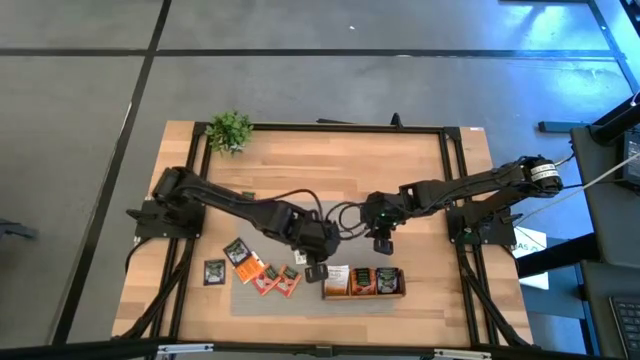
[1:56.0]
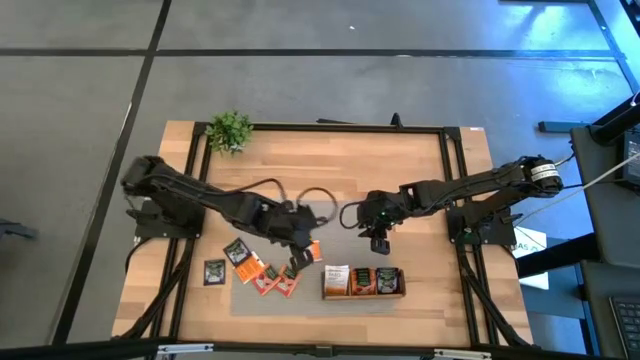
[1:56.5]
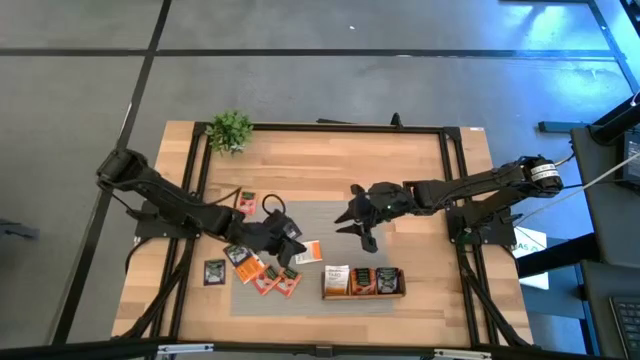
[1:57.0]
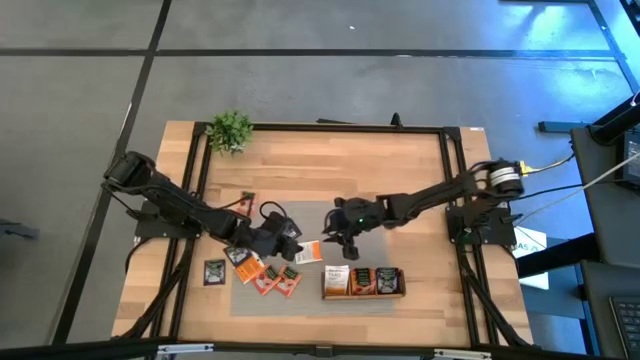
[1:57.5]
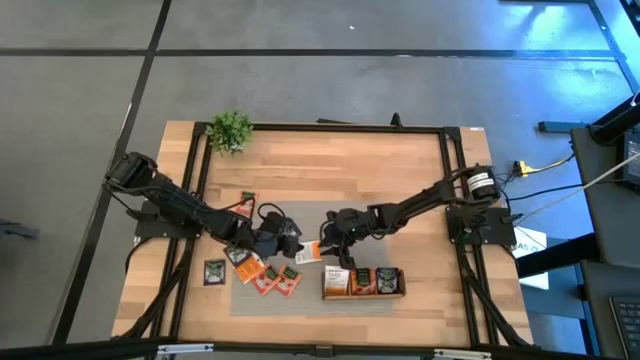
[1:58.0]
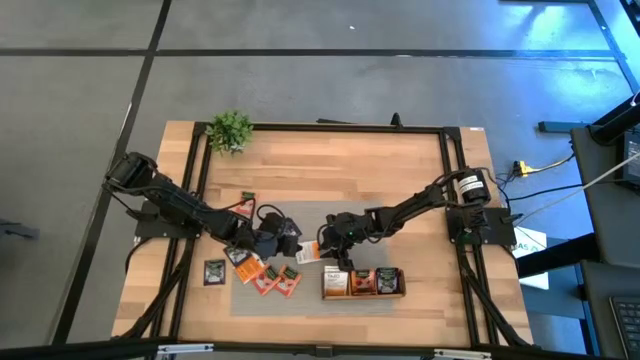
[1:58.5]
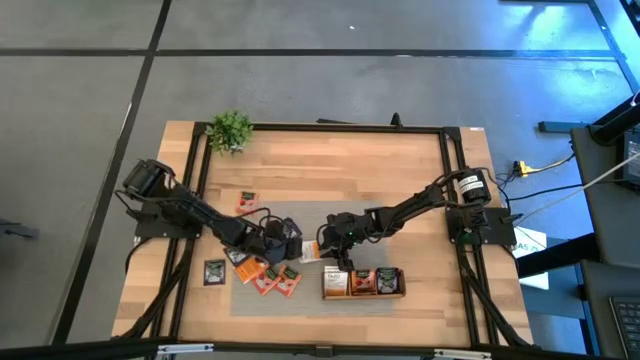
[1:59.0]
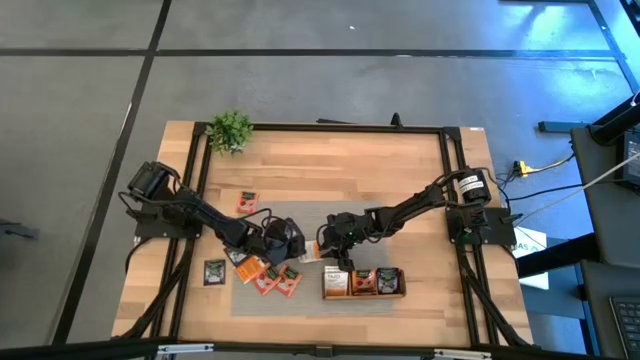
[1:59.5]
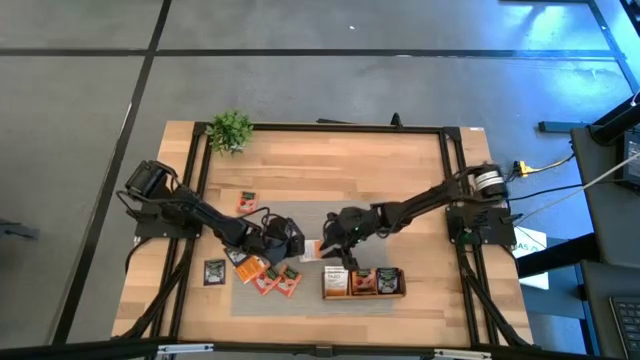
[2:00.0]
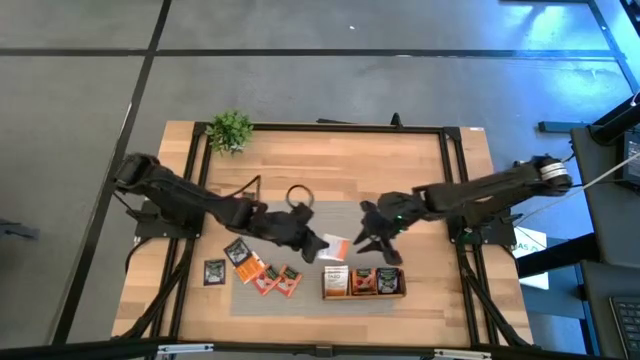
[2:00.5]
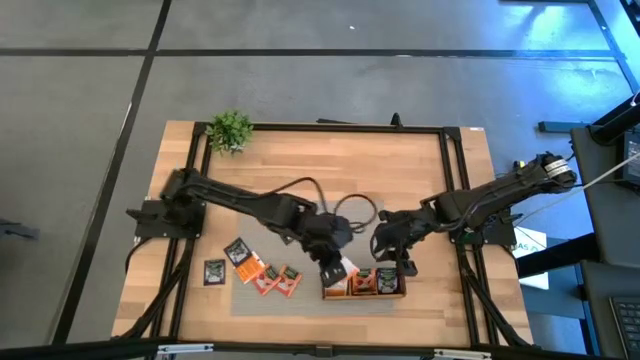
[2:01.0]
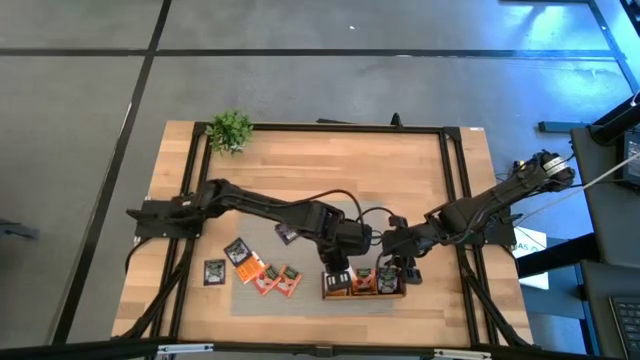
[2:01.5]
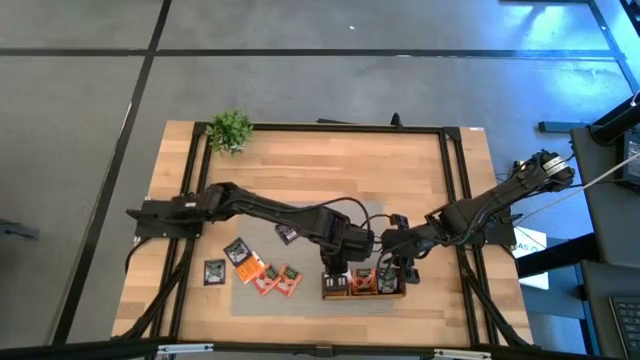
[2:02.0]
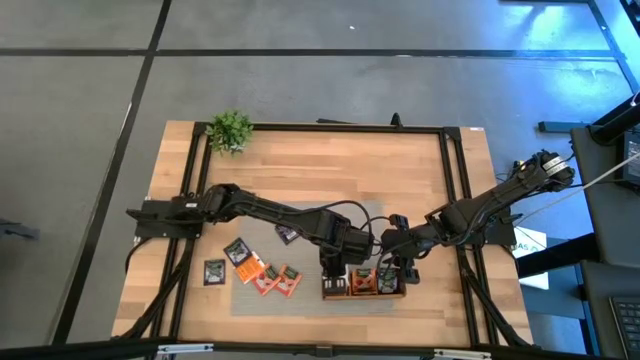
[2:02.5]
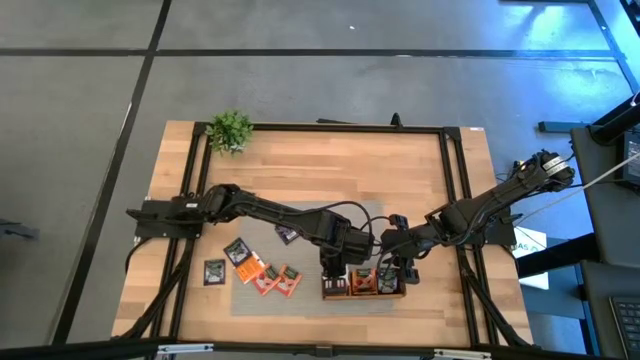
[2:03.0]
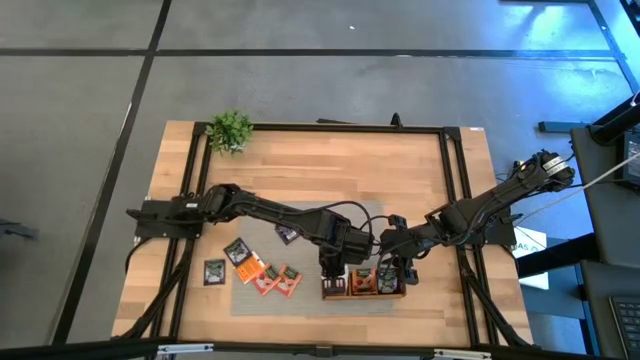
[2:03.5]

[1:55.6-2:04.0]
Task: Pick & Place Tea
Put the right orange tea bag into the left compartment of the wooden organizer

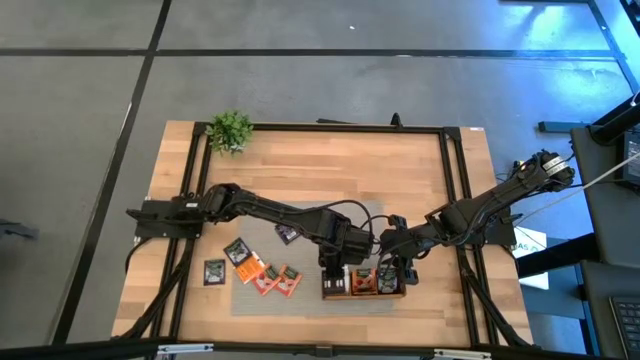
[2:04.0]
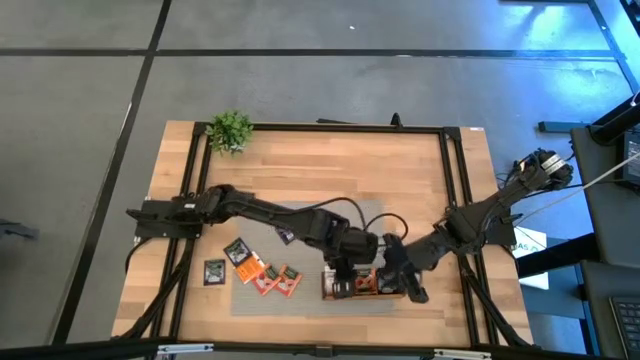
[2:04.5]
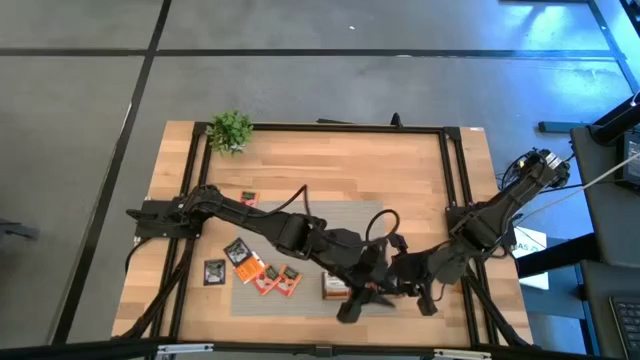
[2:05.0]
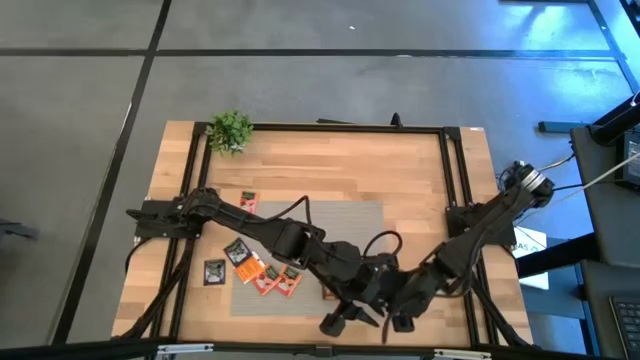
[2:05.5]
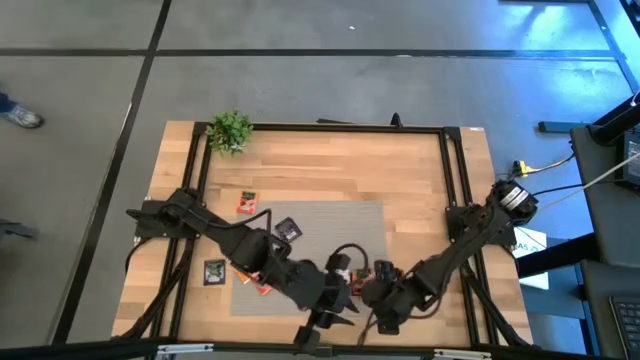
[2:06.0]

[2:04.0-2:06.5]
Adjust the yellow tea bags in the wooden organizer

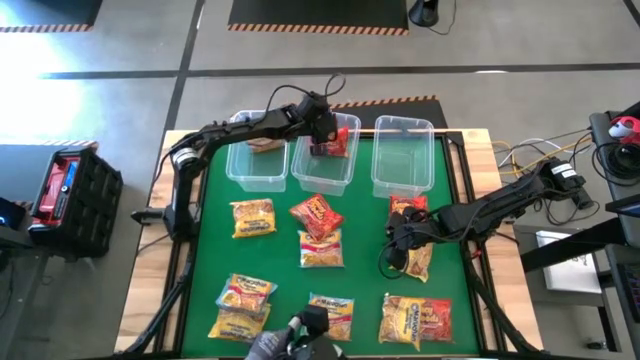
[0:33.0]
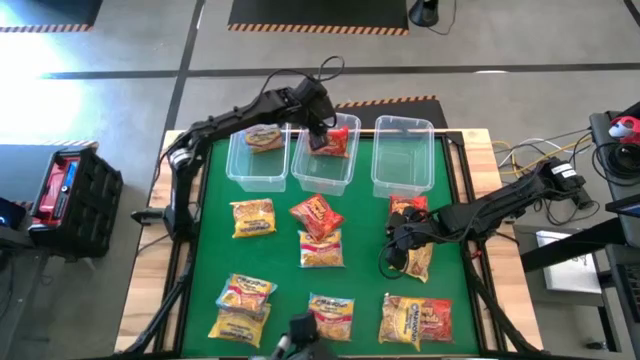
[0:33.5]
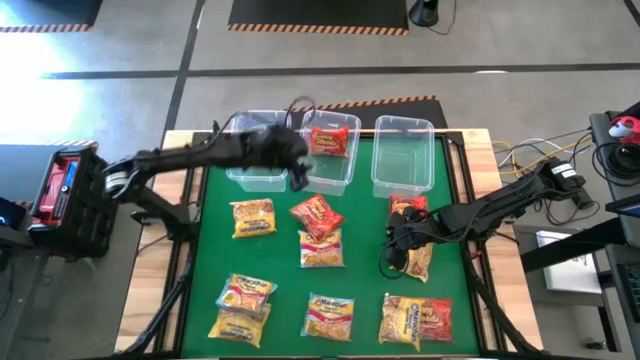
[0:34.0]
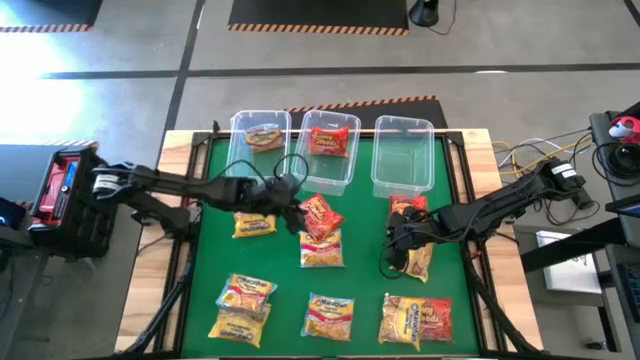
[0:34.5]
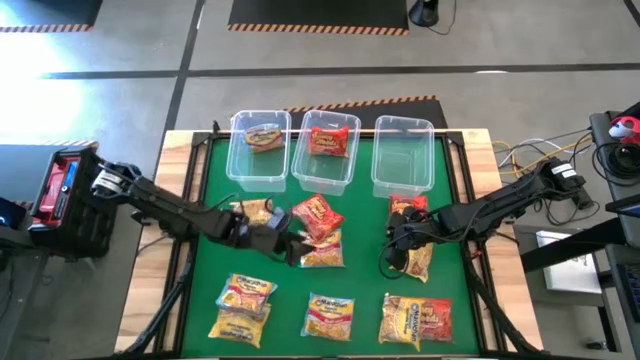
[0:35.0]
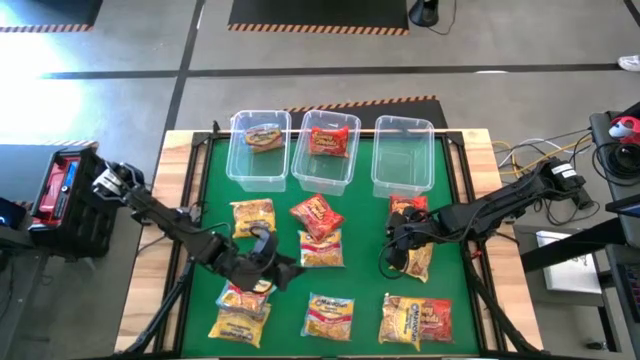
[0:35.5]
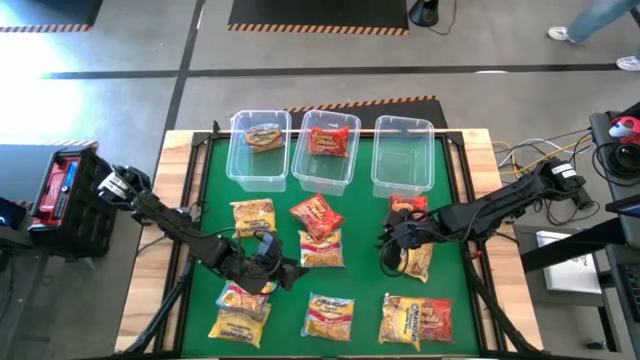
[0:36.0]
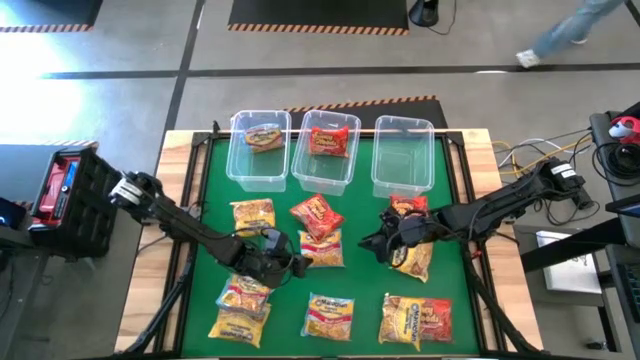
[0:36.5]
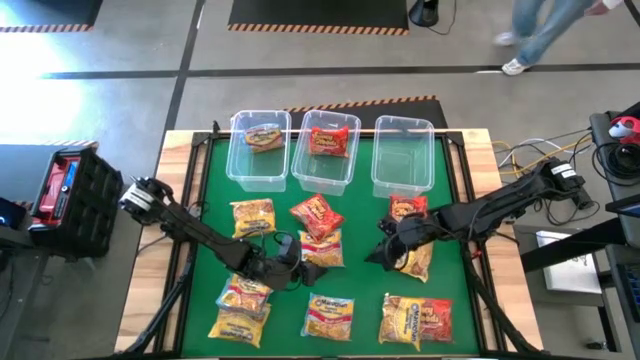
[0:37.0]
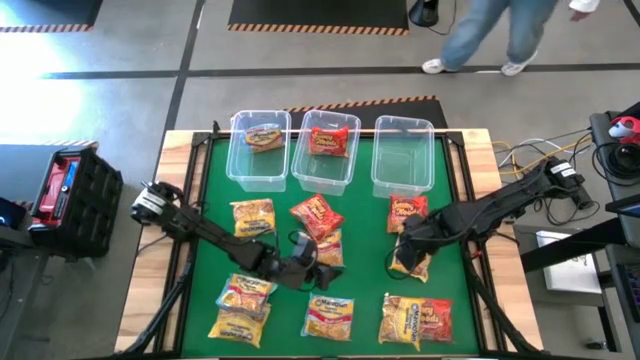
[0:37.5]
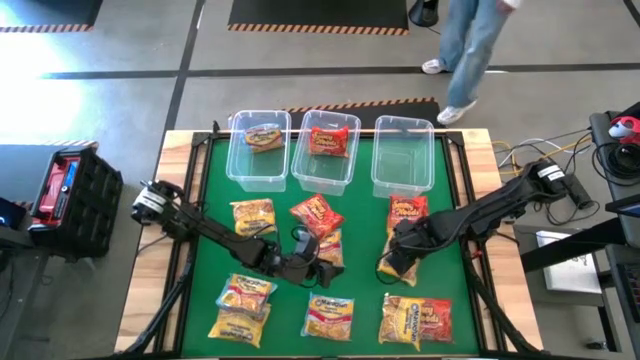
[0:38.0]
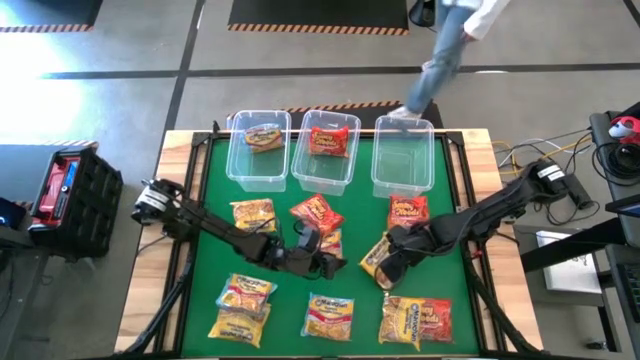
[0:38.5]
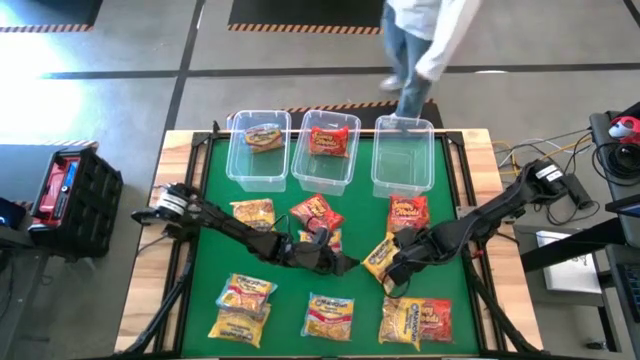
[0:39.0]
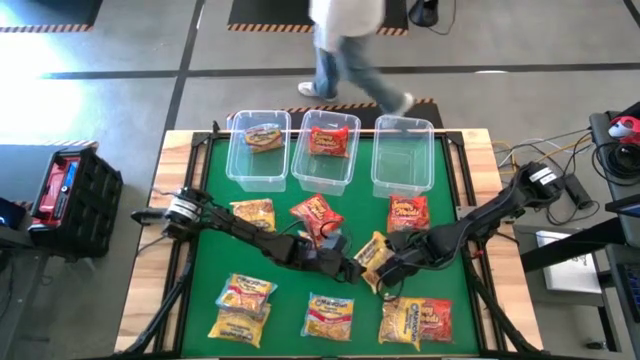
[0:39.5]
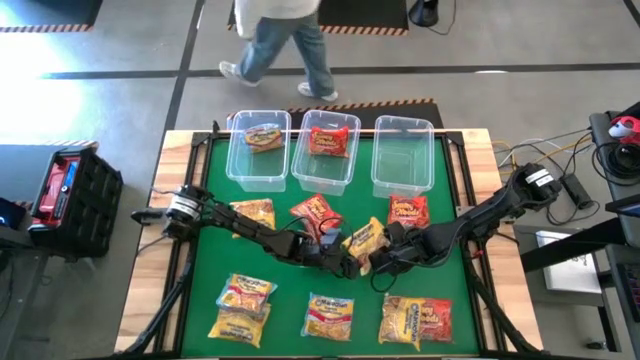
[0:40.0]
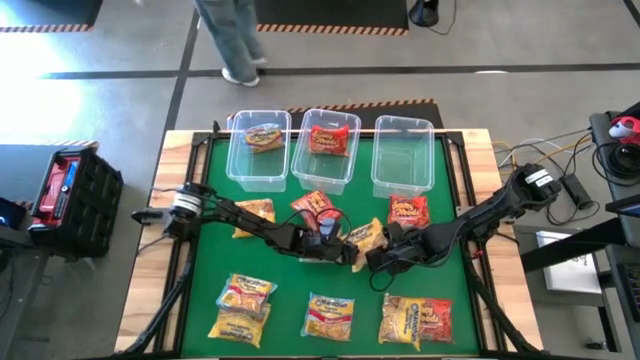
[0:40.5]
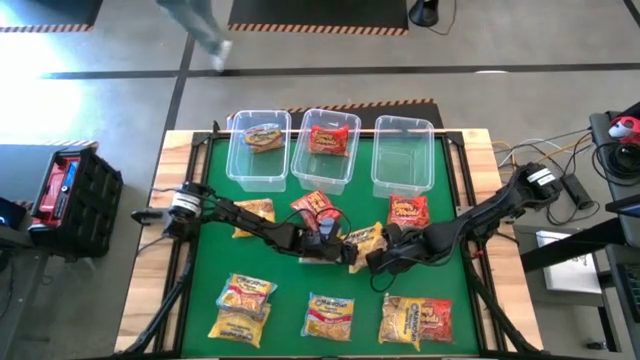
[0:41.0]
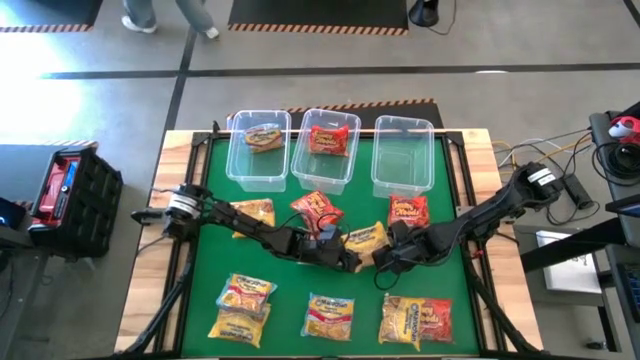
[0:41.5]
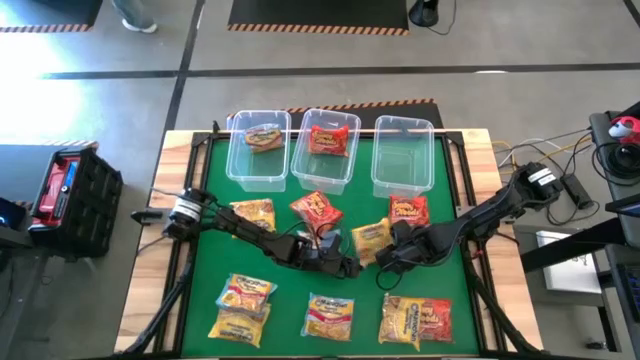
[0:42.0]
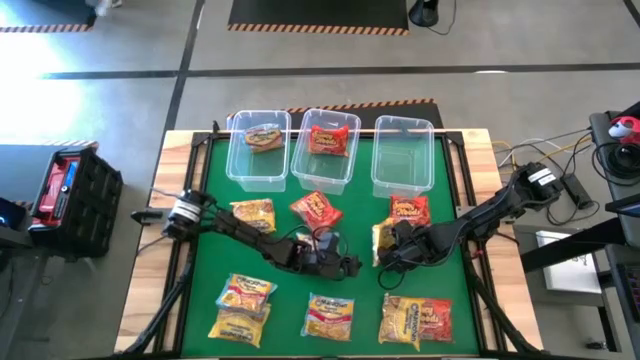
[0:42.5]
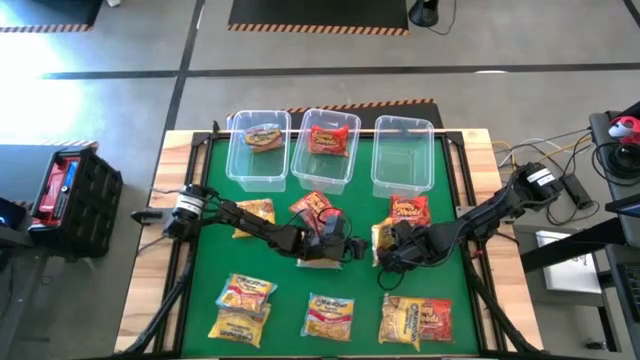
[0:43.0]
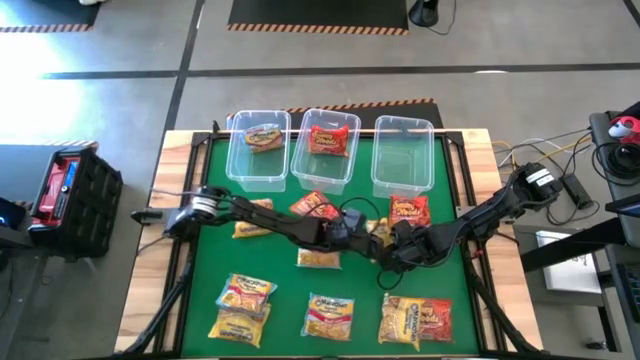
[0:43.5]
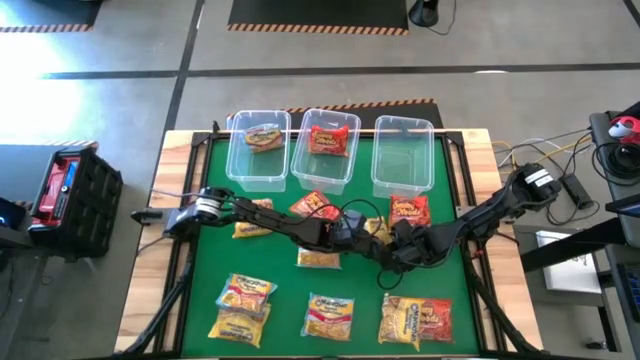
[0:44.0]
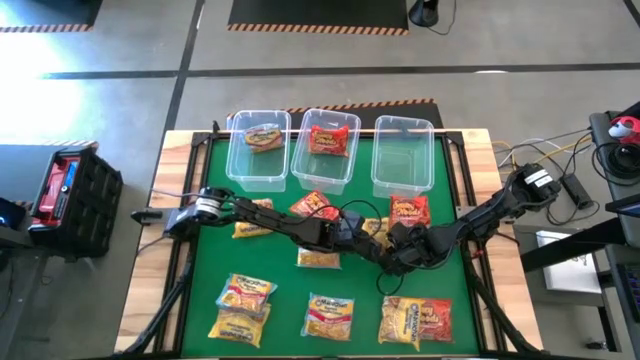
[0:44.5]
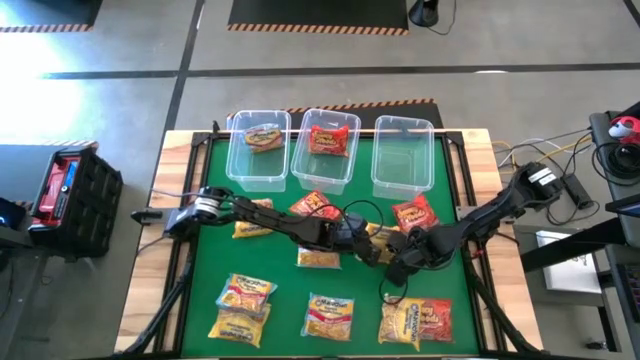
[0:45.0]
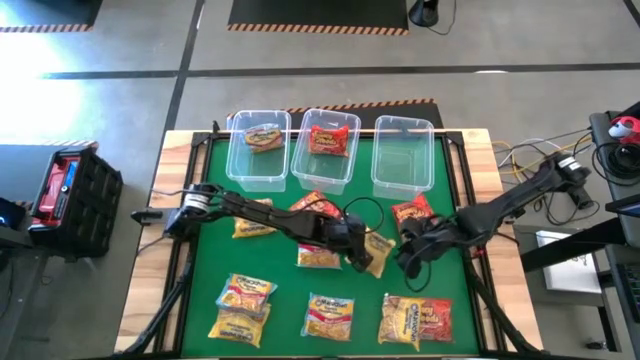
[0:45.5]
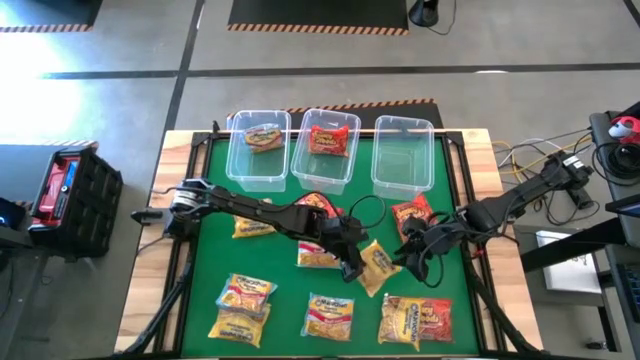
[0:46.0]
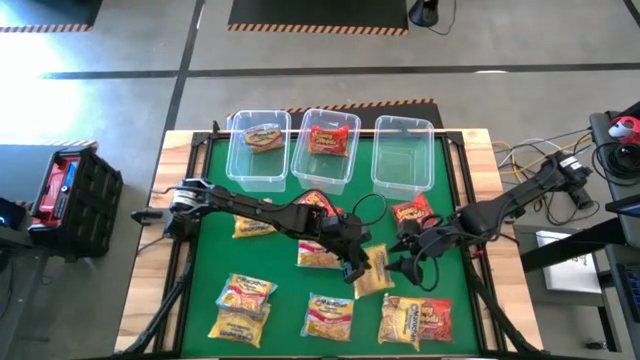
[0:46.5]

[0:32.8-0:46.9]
Task: Sort Maruchan noodles
Put the top right yellow noodle pack into the top right transparent bin
